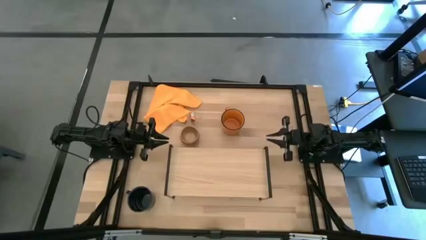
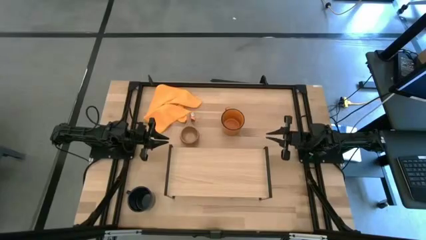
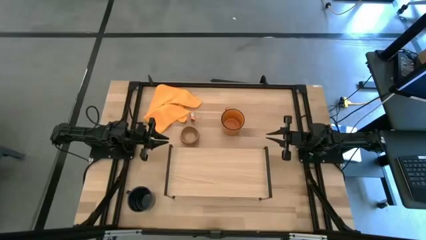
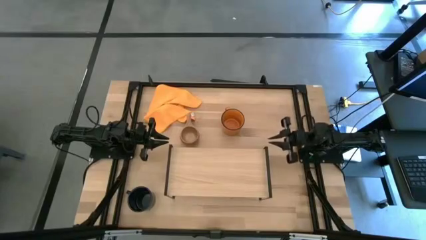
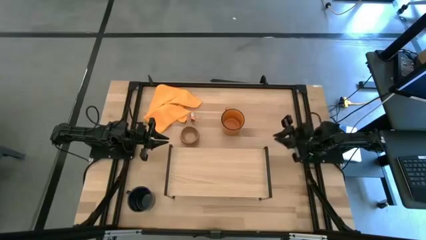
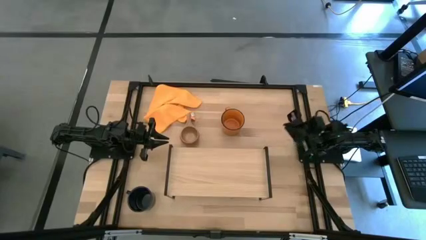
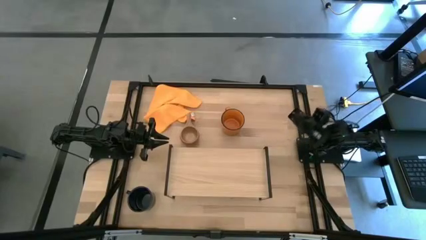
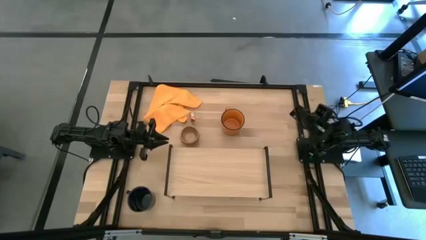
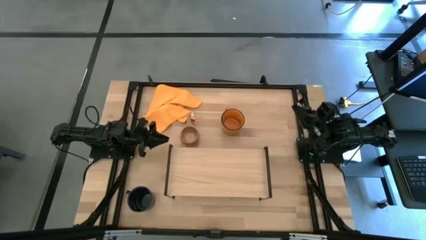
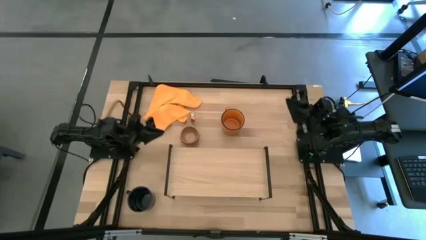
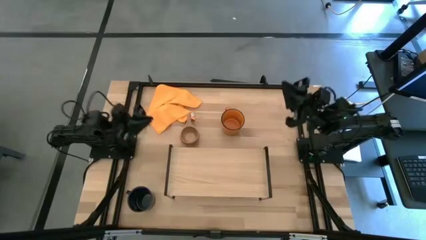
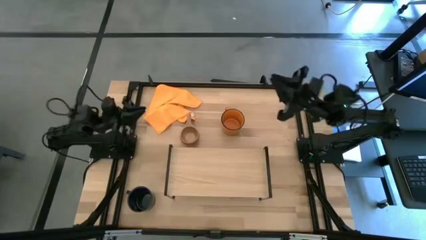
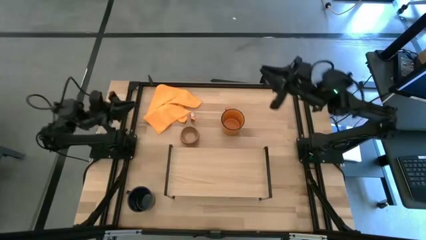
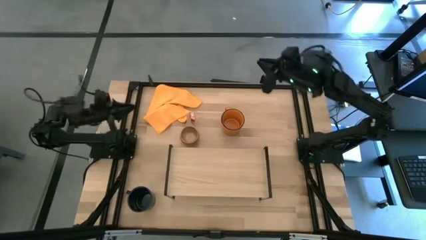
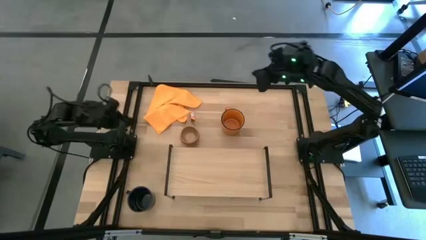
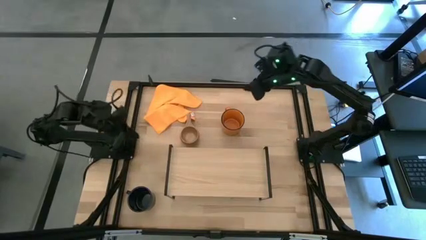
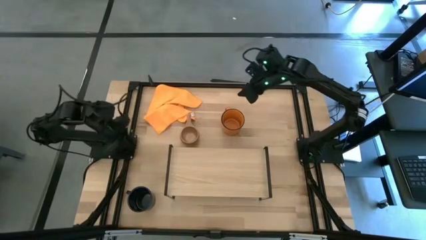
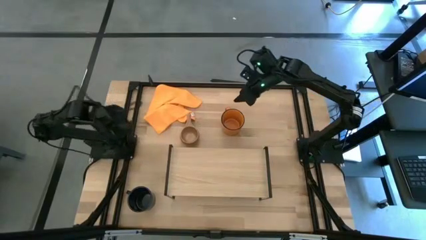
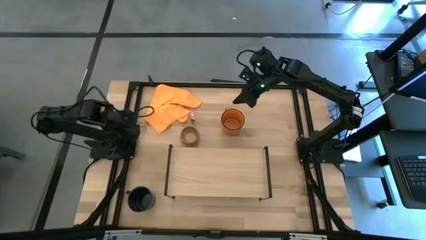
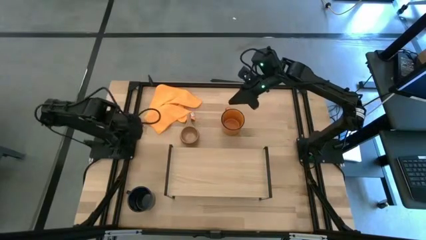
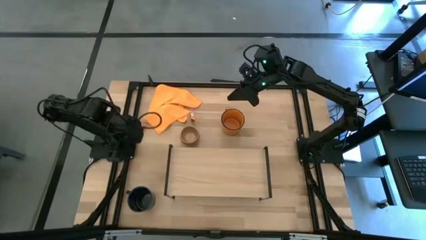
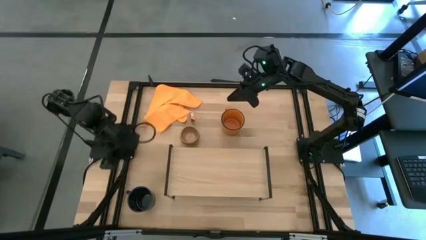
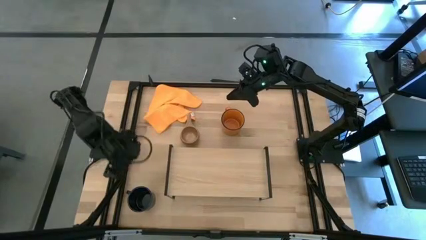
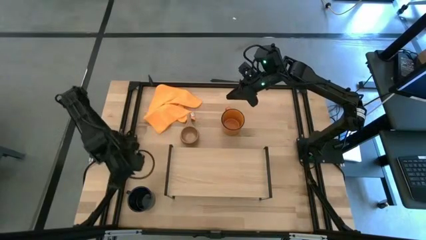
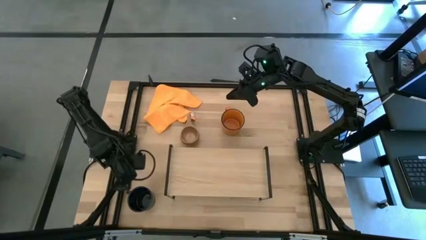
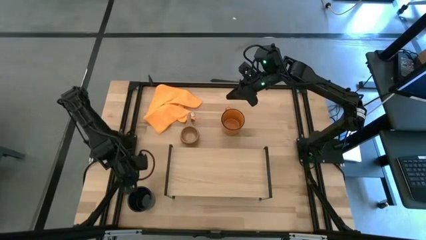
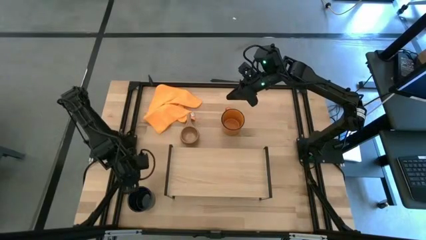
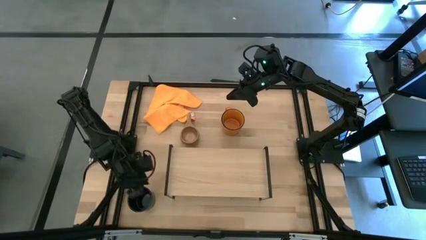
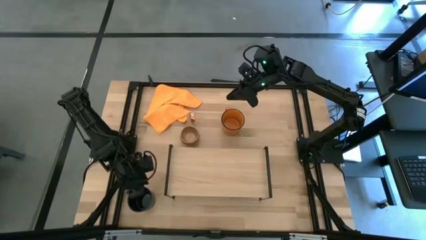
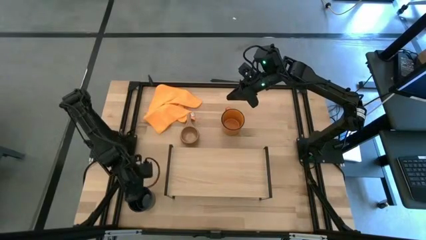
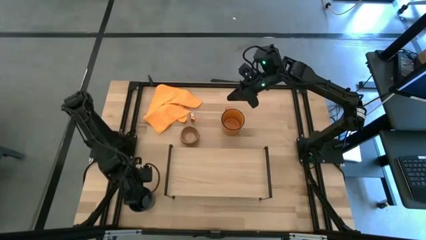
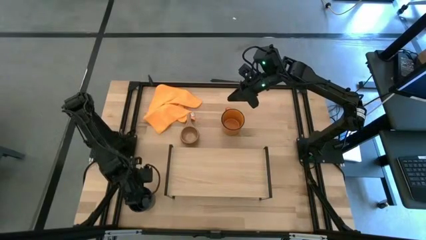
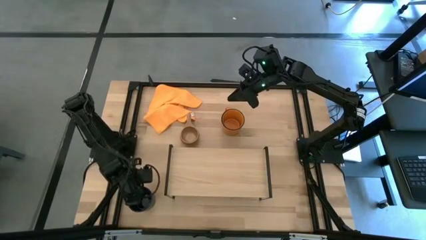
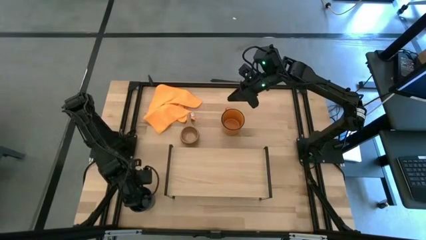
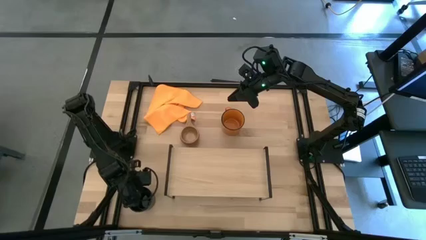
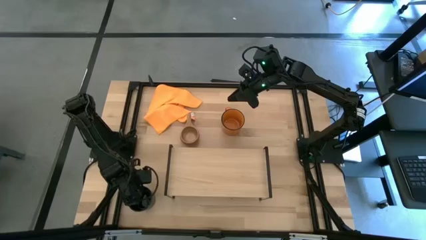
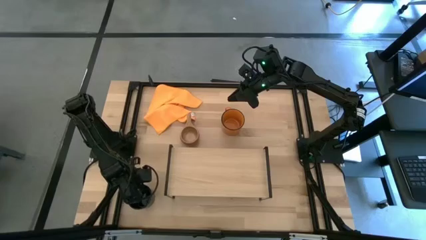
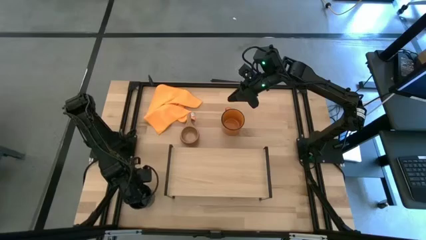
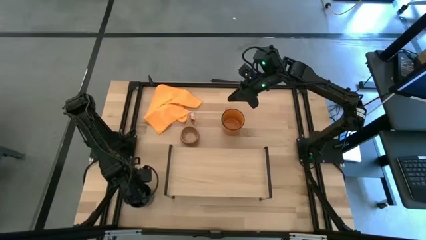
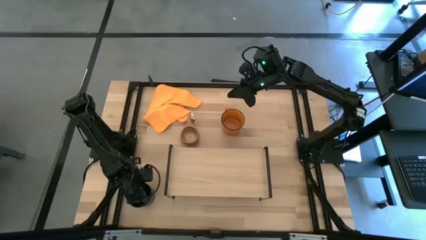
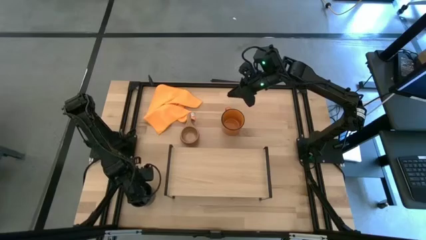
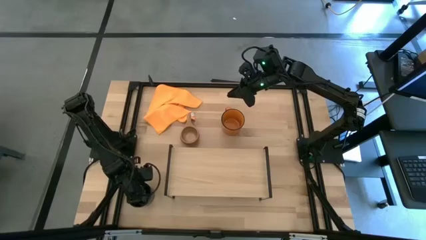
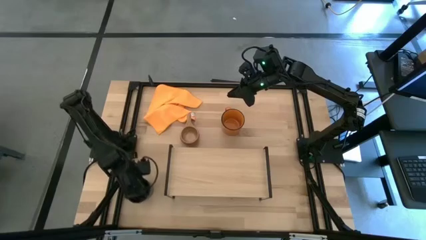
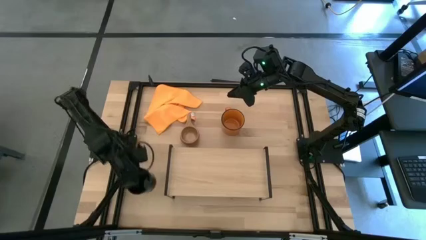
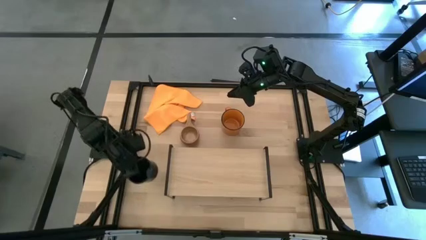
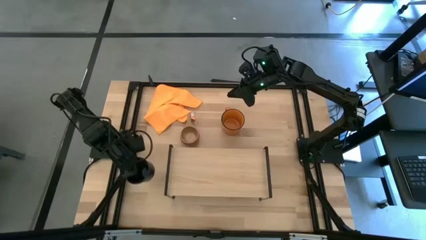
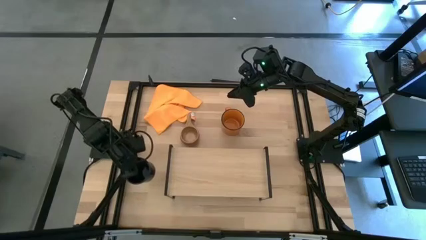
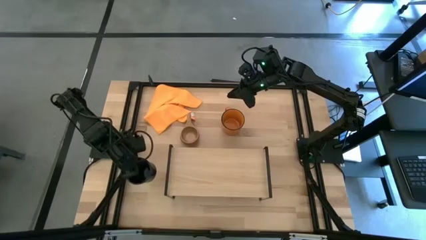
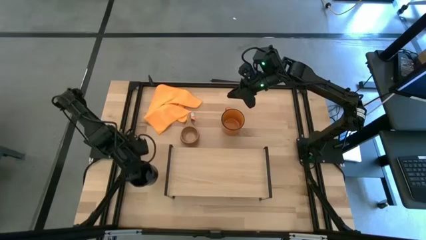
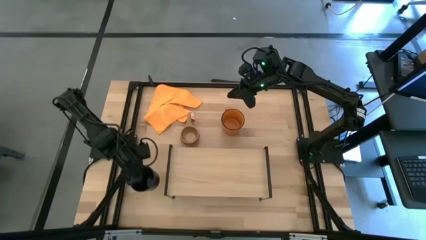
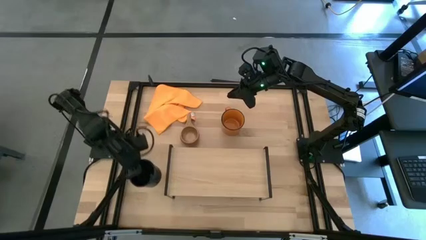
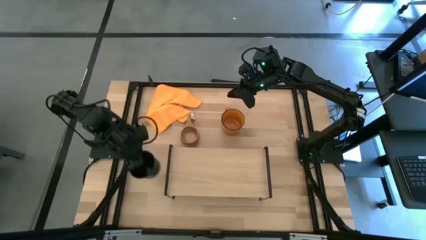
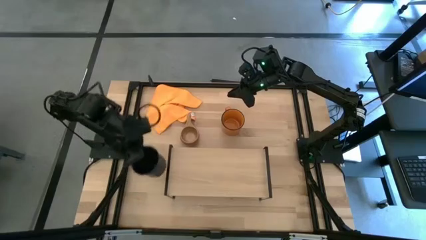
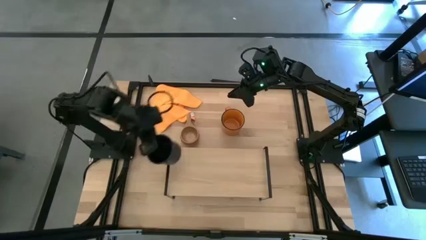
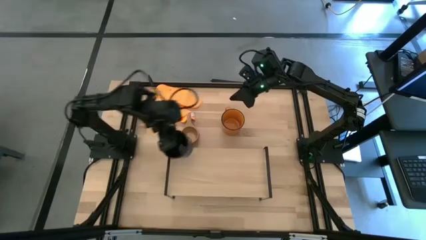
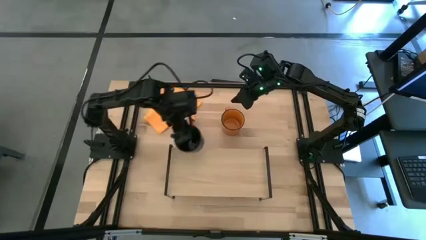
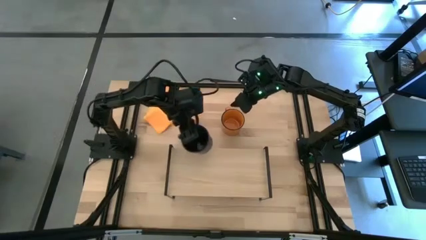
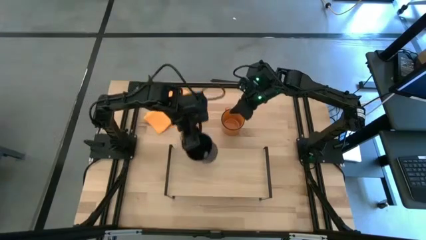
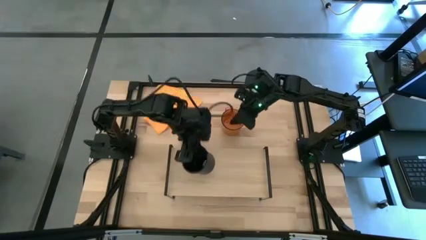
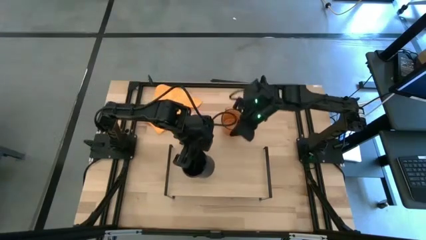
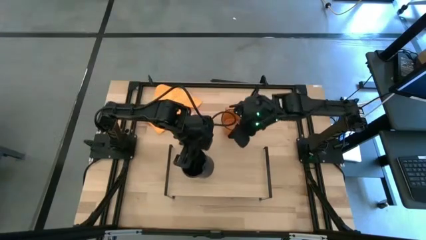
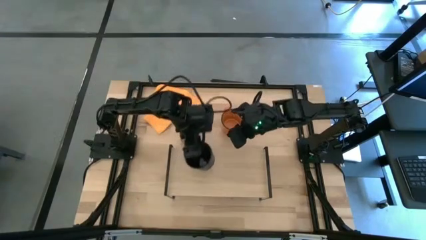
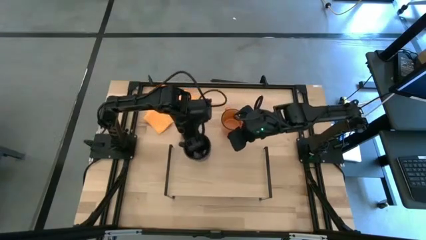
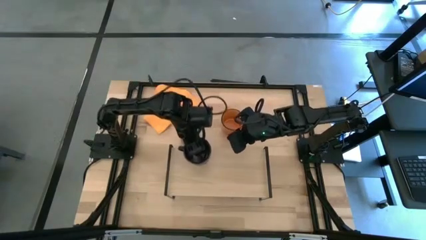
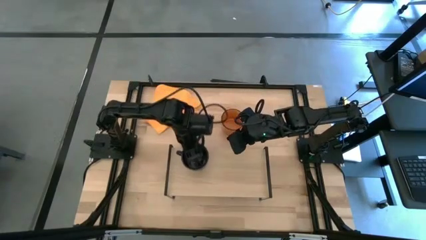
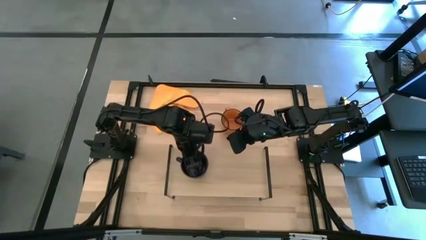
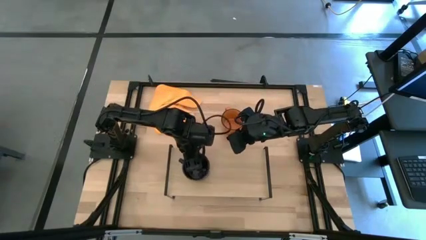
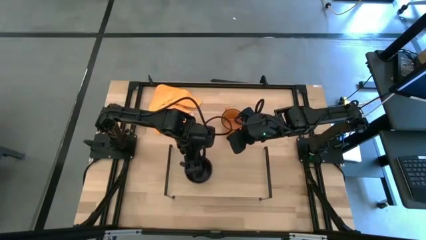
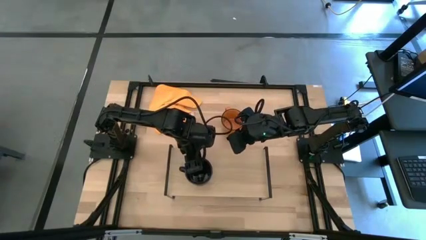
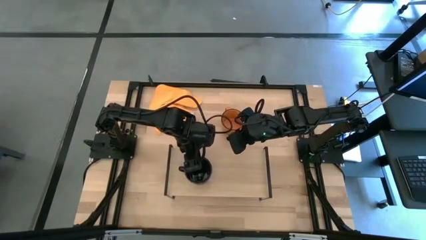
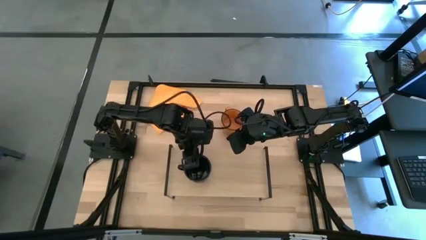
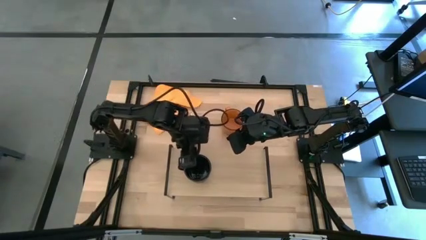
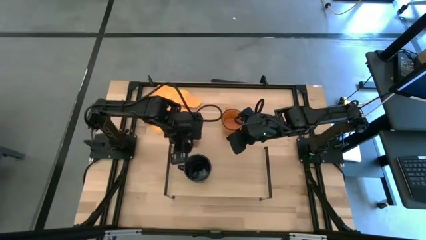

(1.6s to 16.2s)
Task: Stack small to large cups/mugs on shelf
Put the dark blue mug on the shelf
